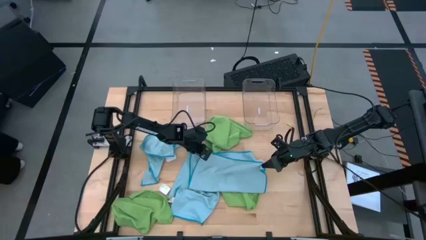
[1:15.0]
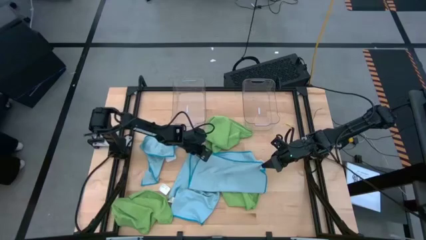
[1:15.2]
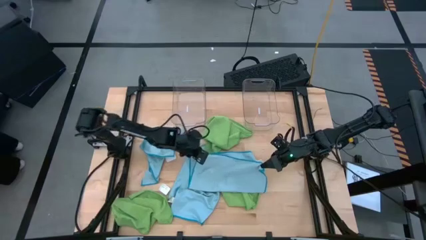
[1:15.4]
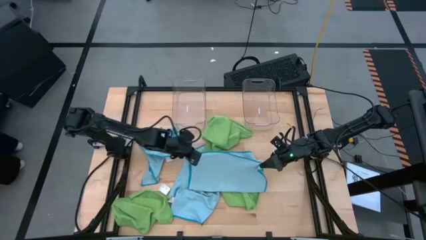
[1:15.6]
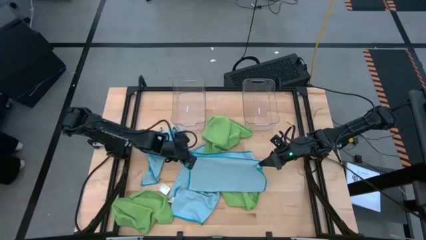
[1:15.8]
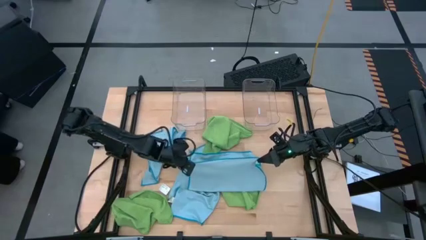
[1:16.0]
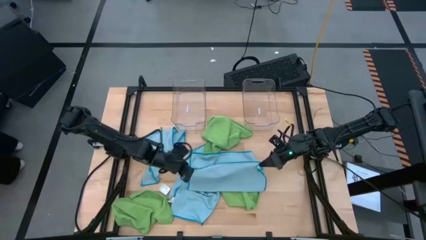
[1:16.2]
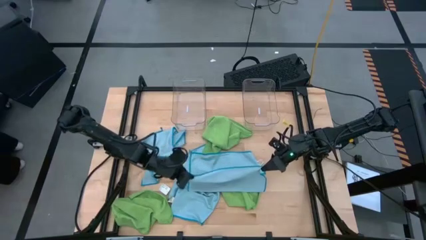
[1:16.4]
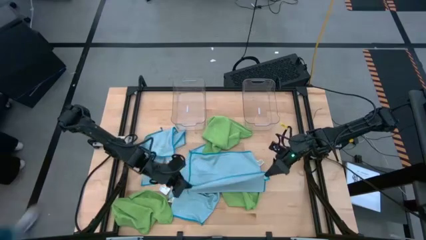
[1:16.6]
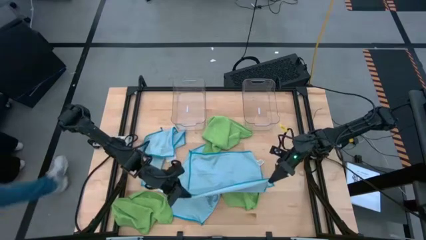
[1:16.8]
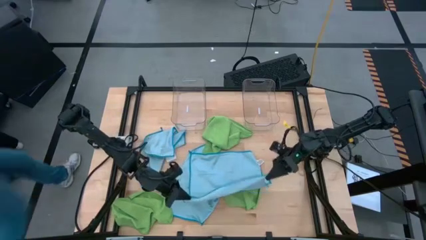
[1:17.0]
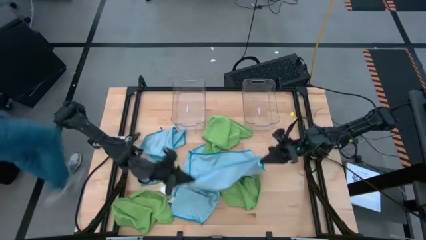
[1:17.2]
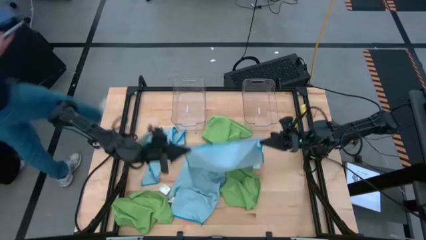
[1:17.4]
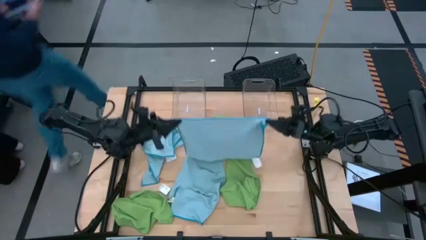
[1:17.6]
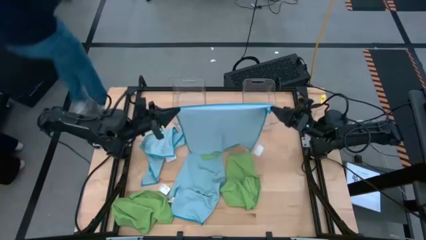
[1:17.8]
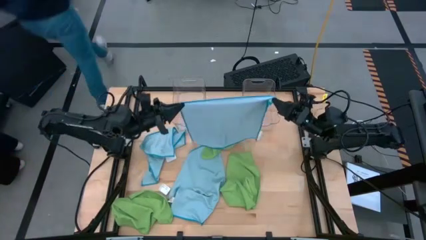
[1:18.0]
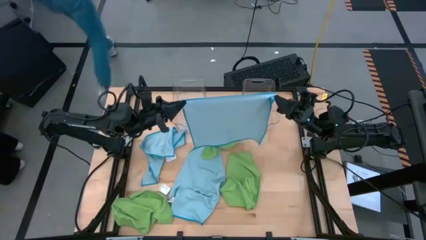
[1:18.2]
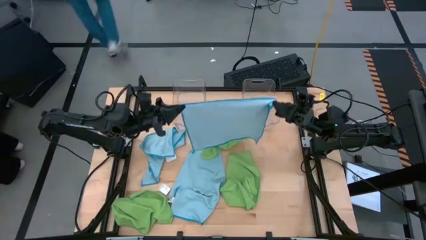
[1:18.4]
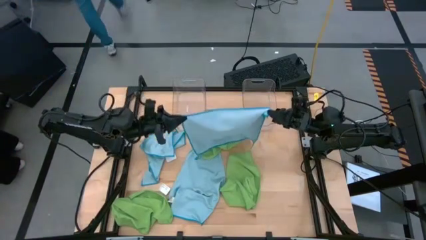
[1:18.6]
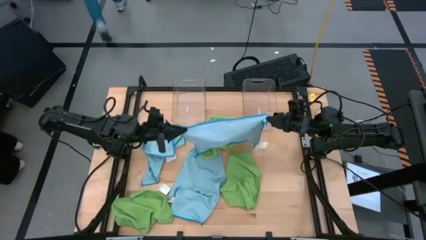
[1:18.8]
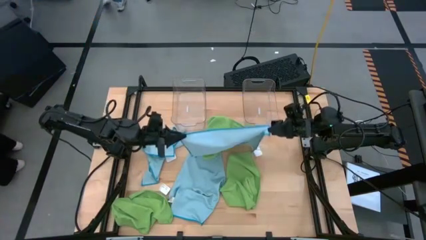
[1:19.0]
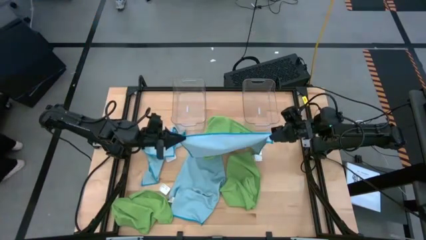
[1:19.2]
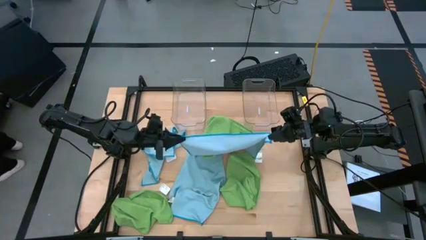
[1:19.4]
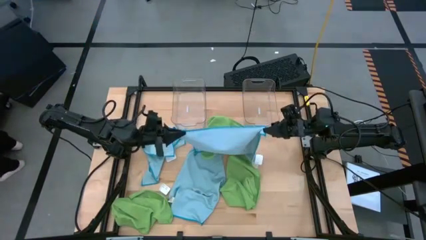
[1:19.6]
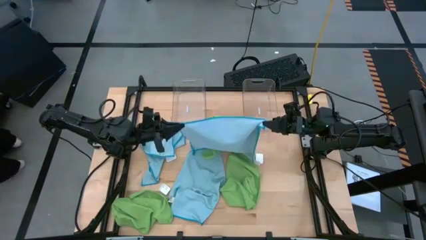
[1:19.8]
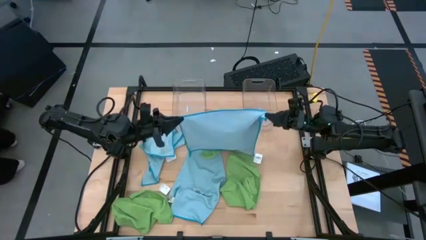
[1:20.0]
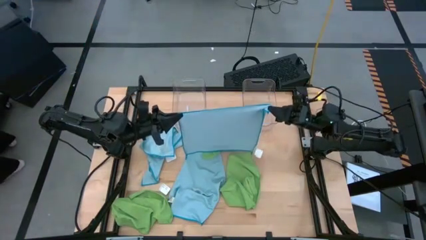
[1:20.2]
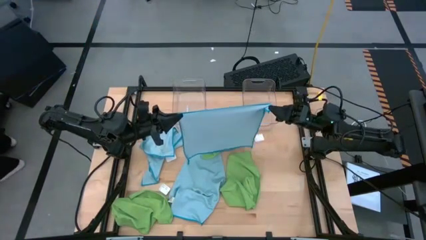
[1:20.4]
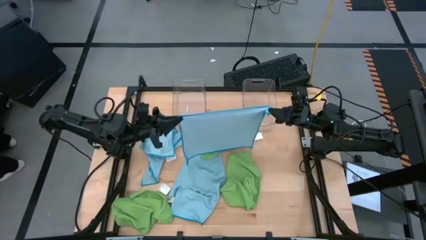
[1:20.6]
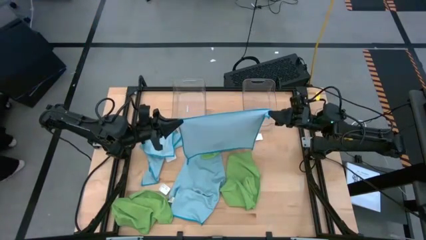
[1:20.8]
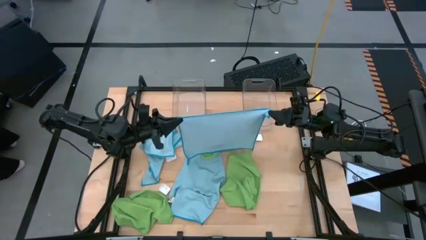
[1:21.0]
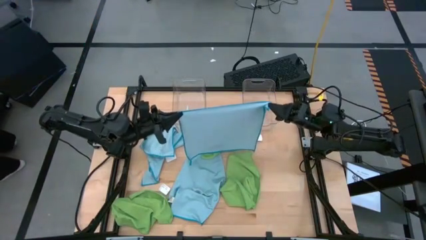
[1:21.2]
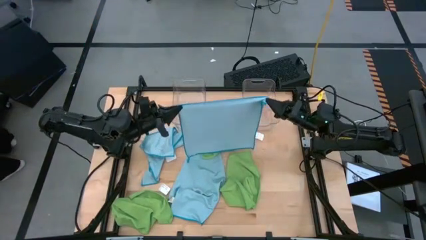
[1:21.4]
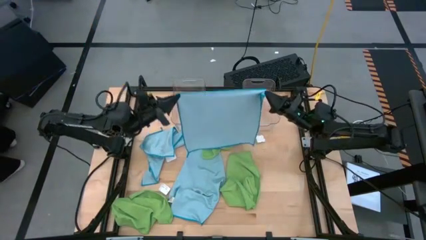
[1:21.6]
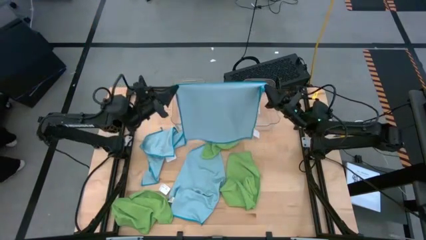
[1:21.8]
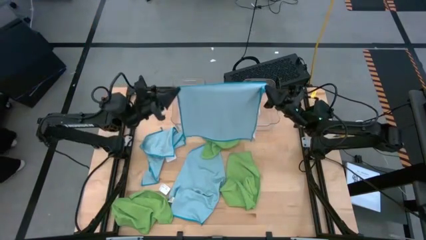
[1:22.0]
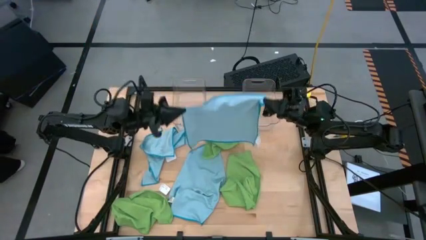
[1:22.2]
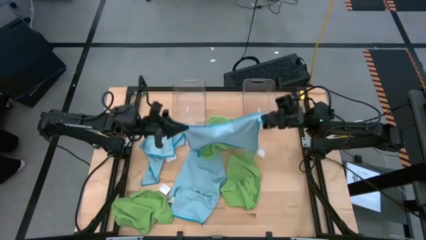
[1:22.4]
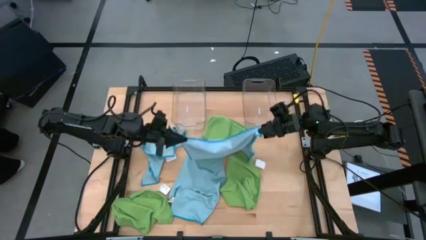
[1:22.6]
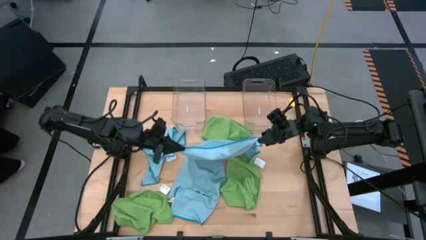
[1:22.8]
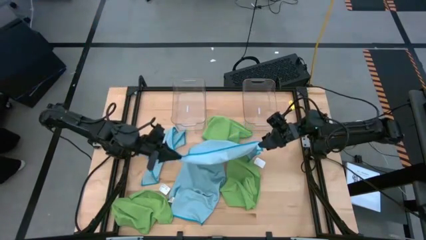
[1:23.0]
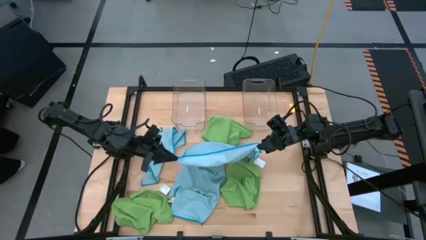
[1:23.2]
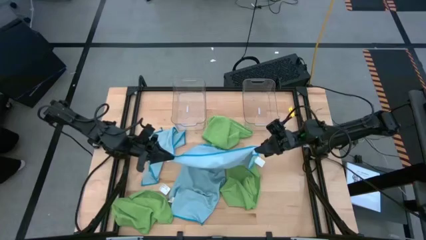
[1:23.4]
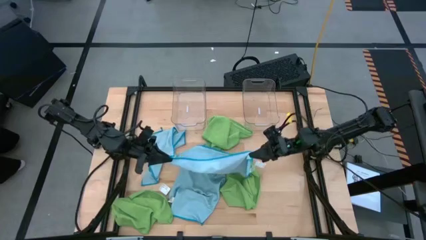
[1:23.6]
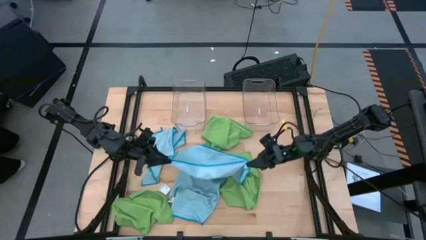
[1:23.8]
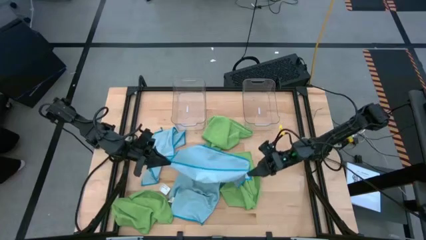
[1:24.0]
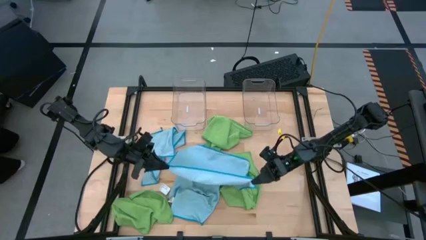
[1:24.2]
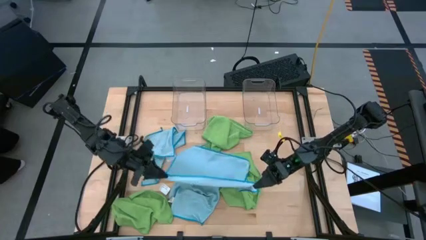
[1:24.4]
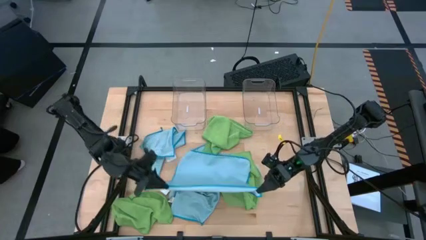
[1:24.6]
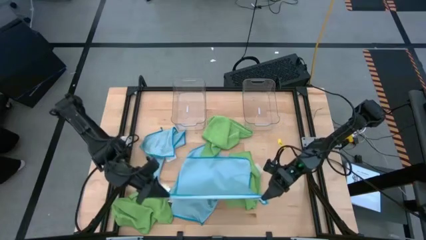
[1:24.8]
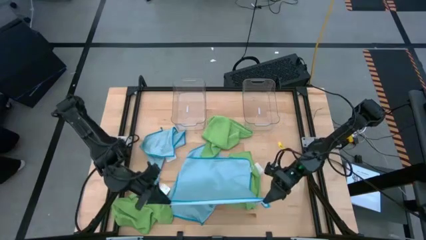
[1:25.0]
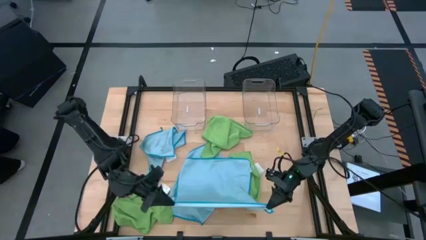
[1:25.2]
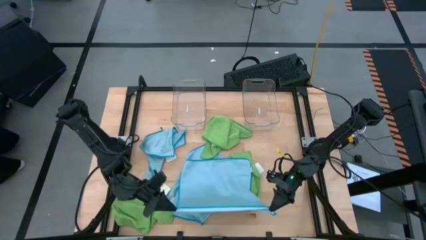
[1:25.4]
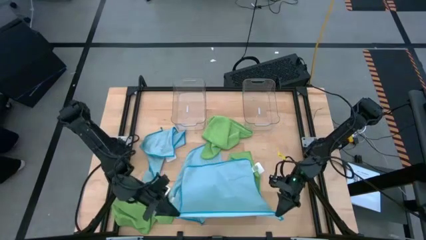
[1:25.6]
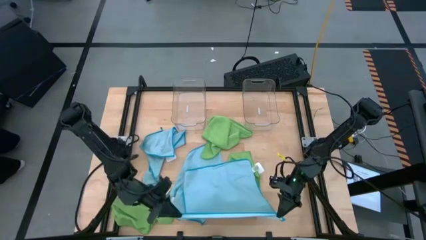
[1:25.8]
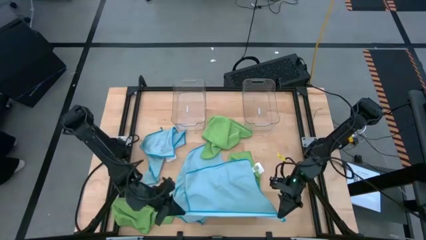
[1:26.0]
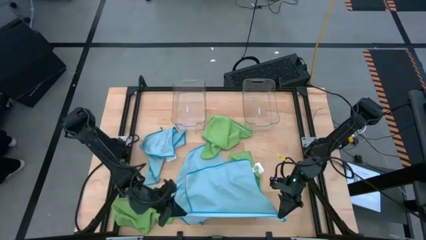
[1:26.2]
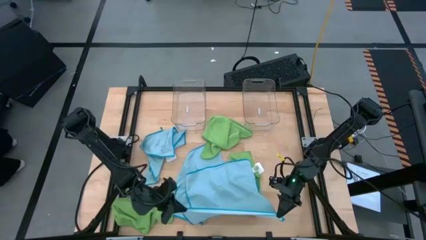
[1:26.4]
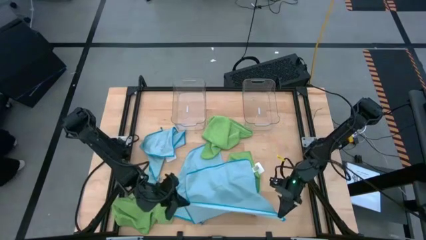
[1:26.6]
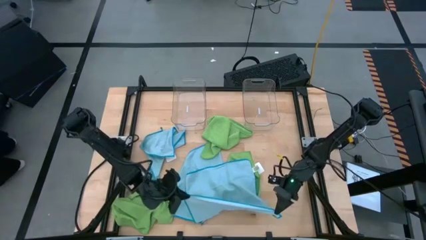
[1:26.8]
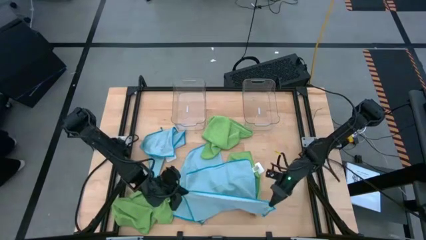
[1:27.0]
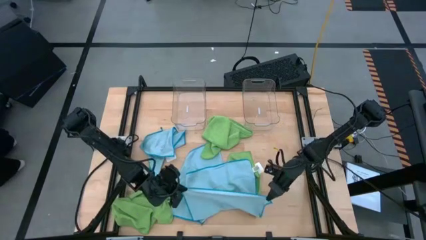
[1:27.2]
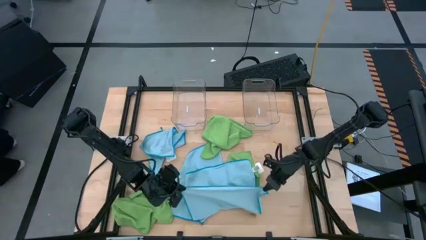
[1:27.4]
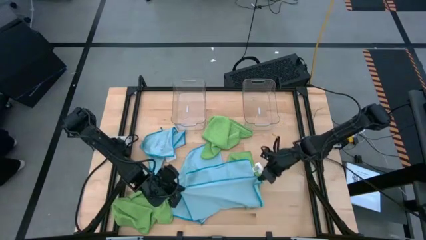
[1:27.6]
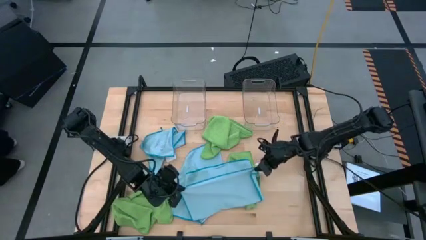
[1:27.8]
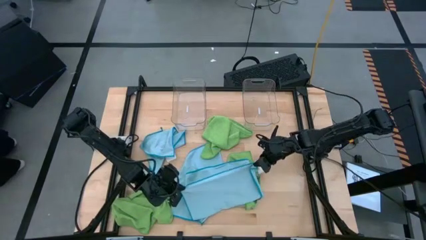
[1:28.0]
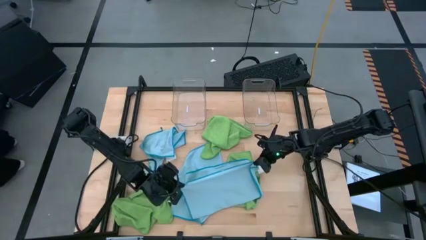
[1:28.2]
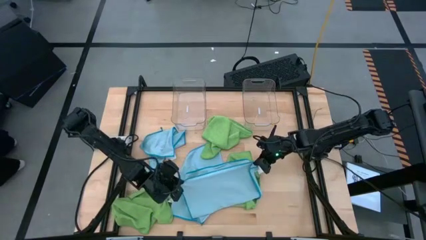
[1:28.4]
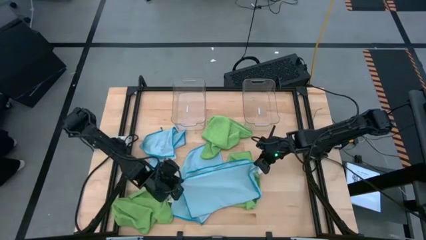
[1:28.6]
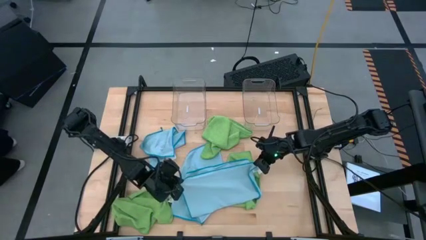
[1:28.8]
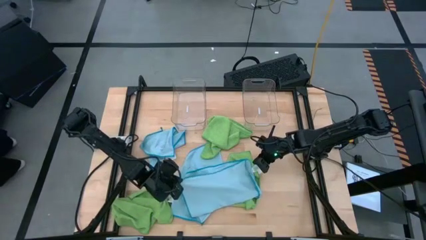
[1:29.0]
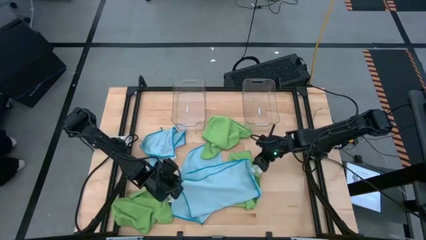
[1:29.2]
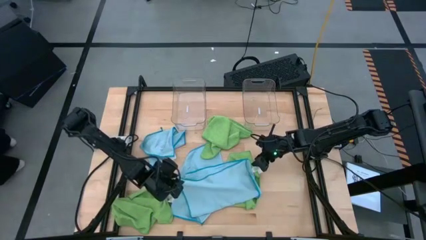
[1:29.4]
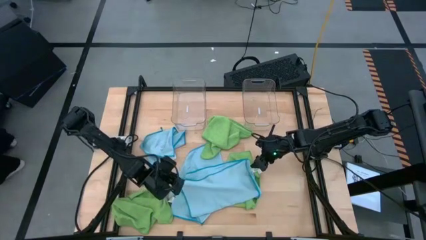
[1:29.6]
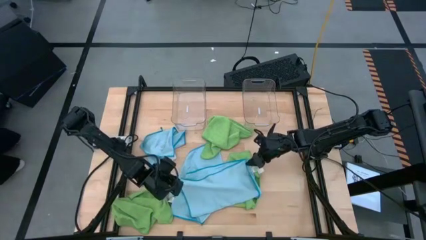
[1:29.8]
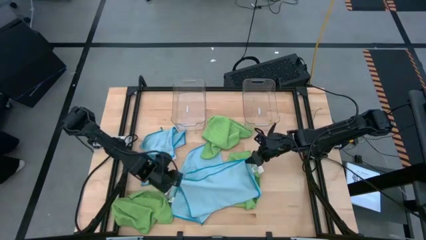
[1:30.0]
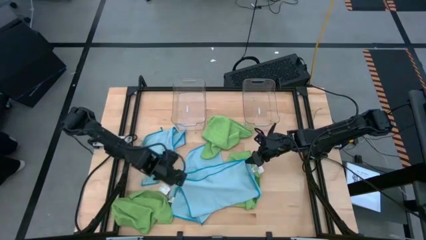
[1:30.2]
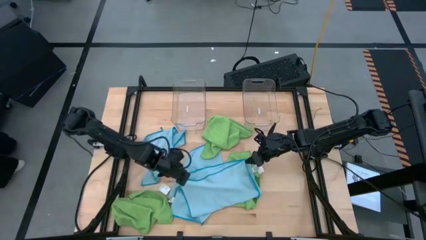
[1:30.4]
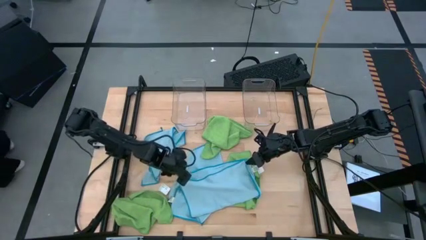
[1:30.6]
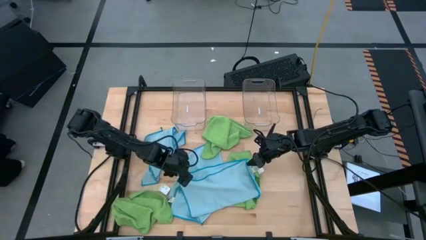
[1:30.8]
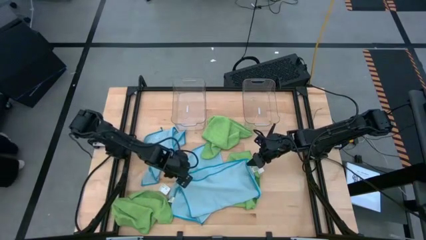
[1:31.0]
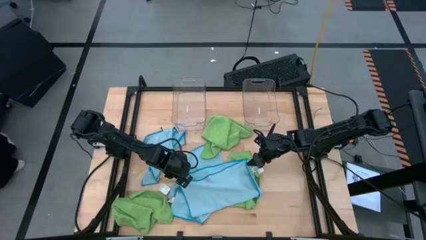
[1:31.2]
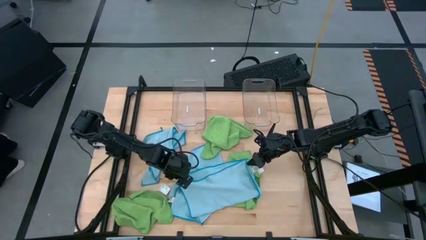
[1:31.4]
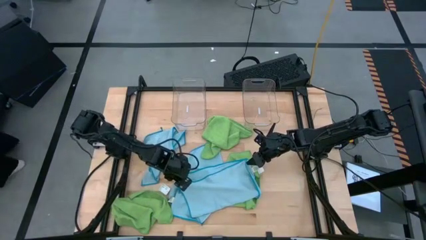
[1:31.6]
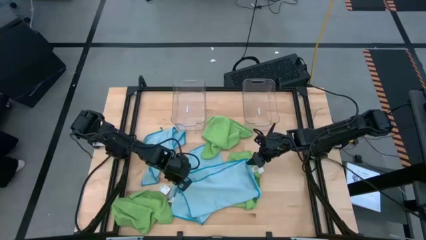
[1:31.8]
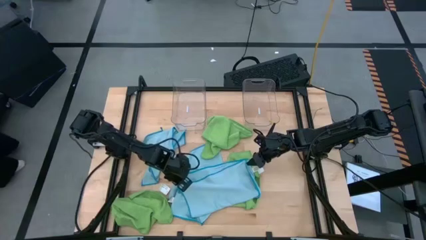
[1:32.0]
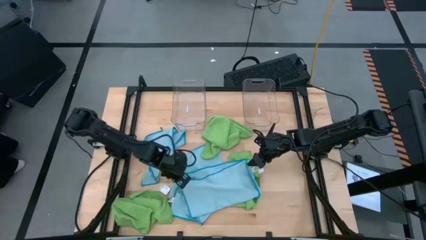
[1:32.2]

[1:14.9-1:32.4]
Task: Fold microfiber towels
Fold the right blue microfiber towel
